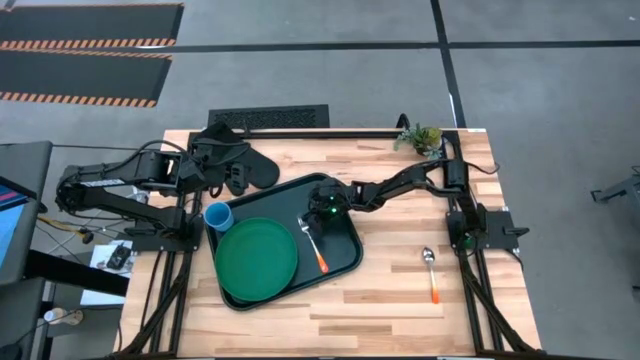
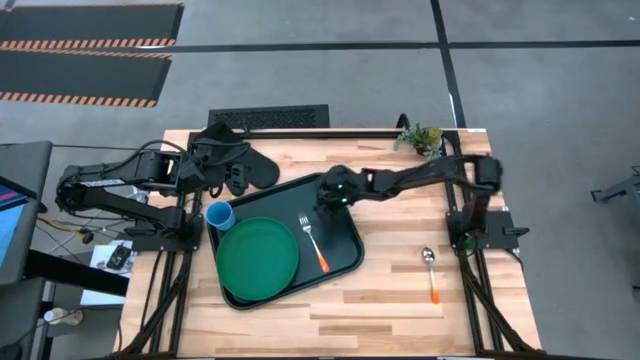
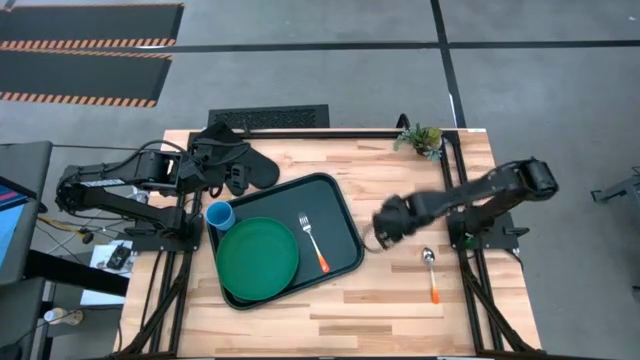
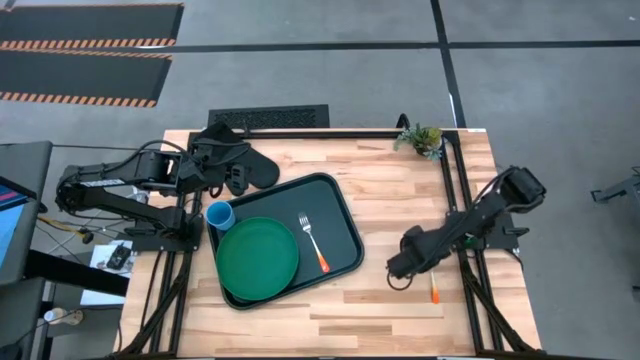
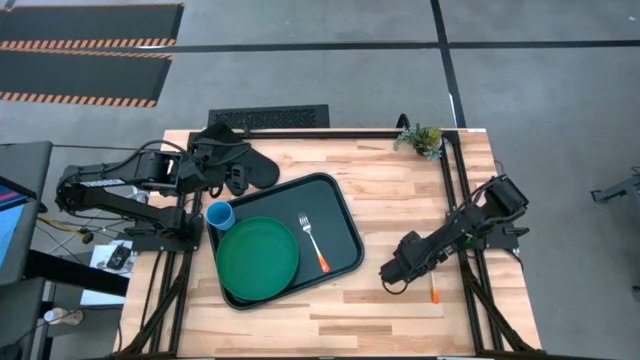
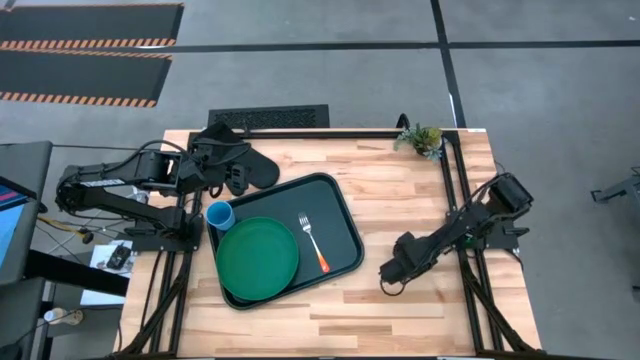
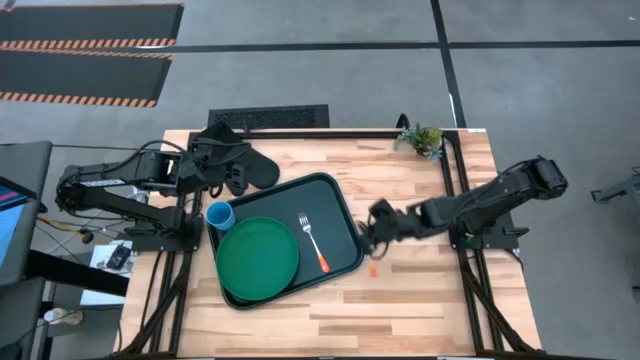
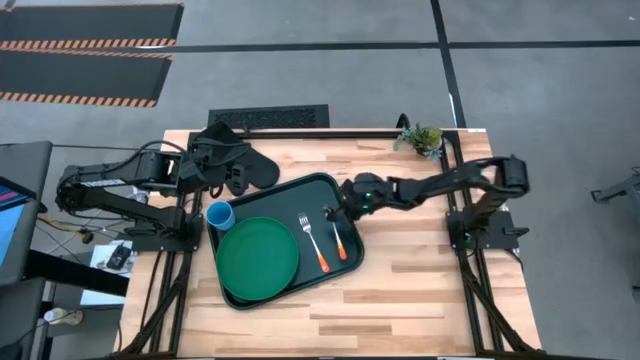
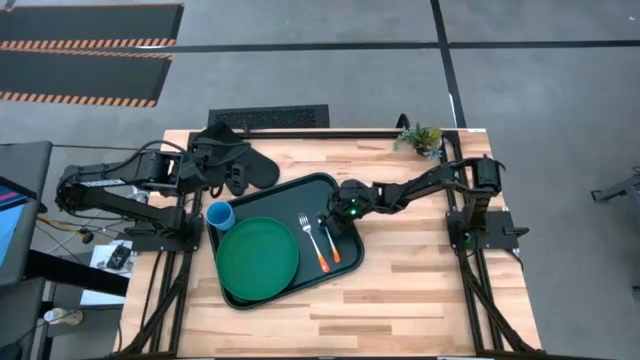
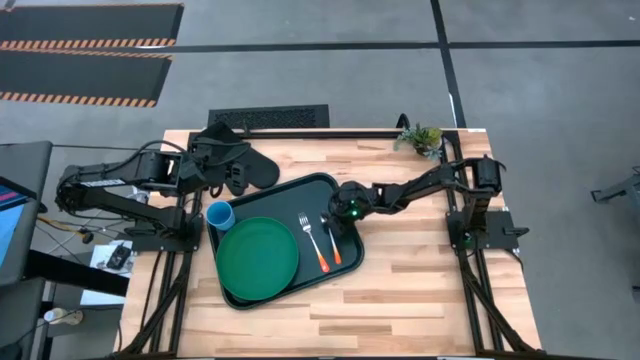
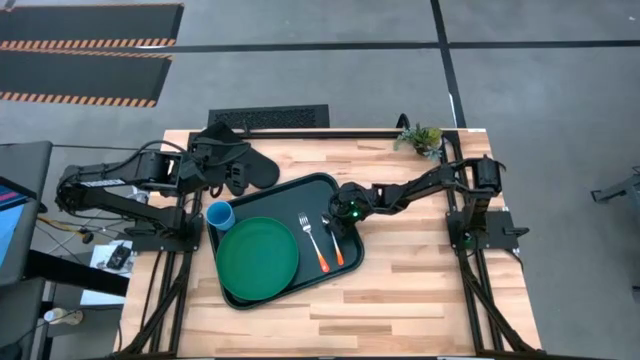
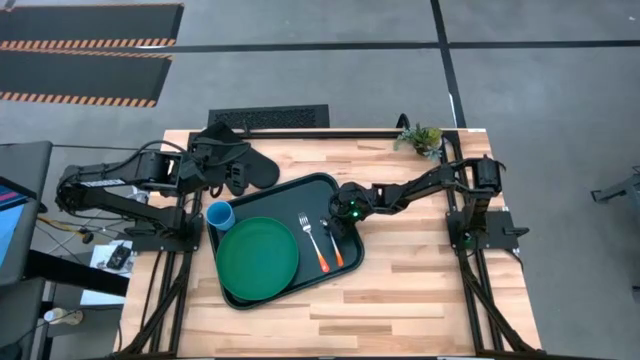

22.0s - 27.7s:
Task: Pick and place plate/cup/fork/spoon on tray
Put the orange spoon on the black tray to the right of the orange fork

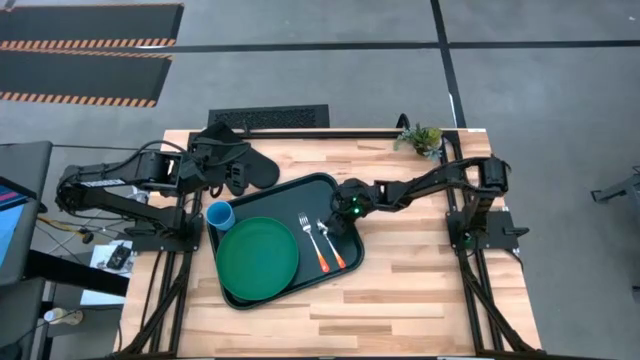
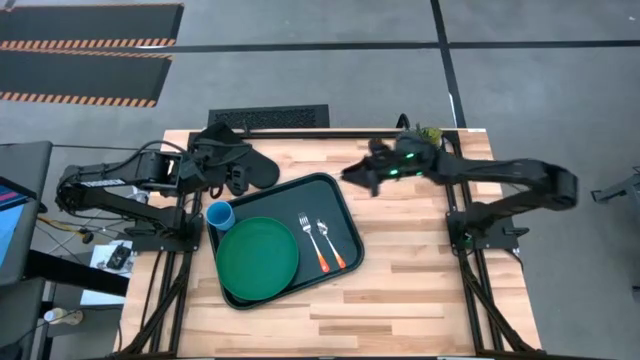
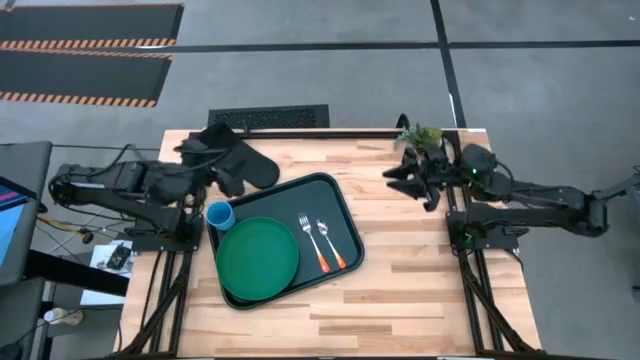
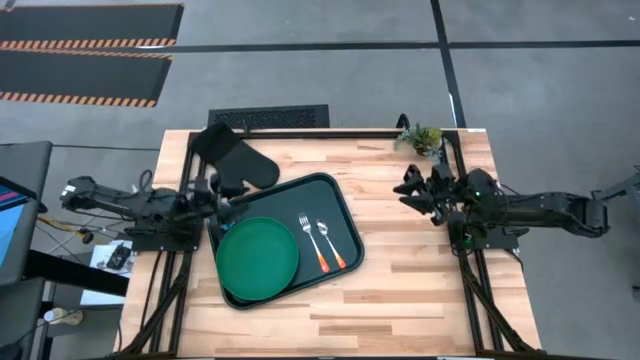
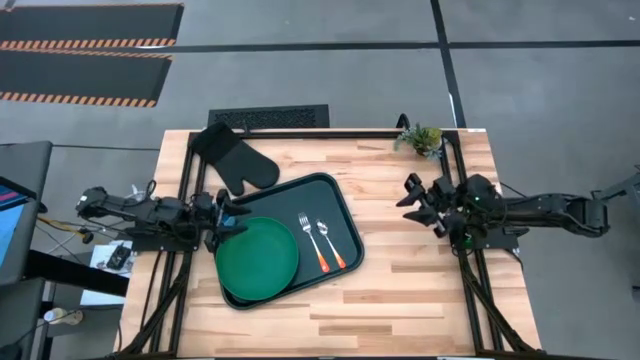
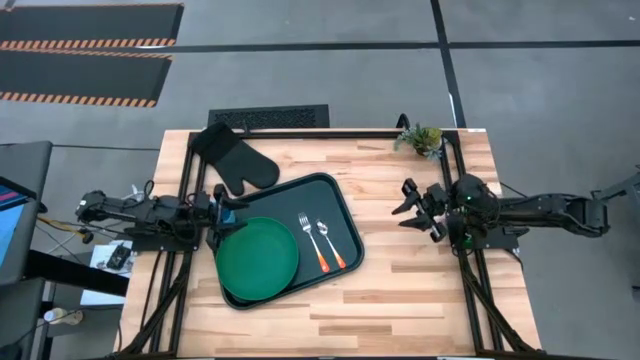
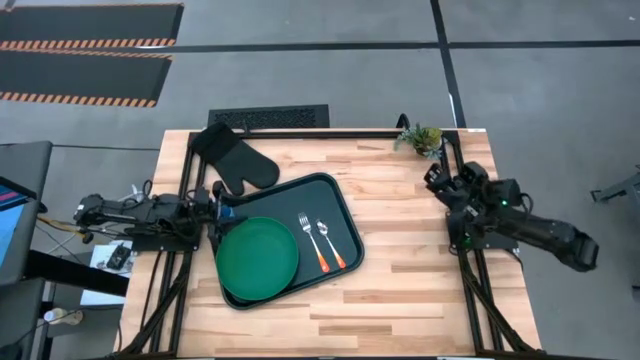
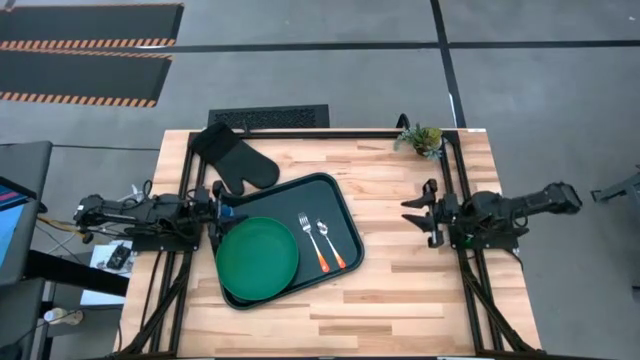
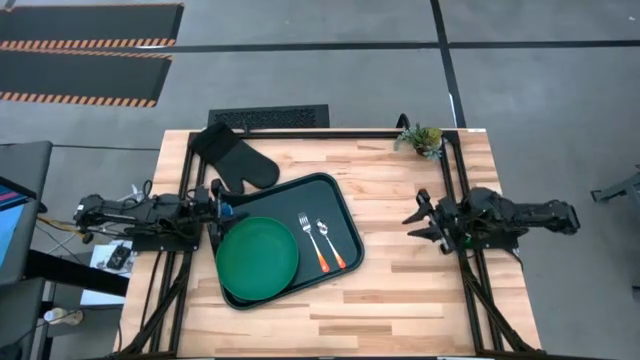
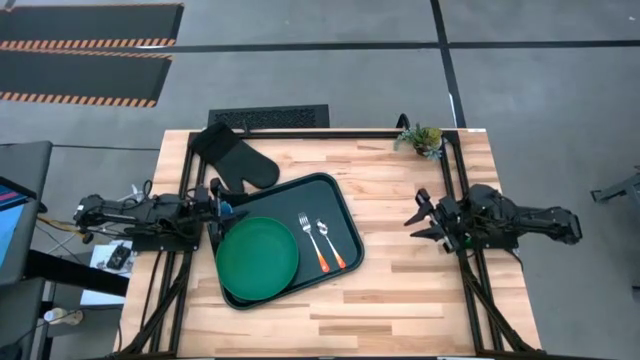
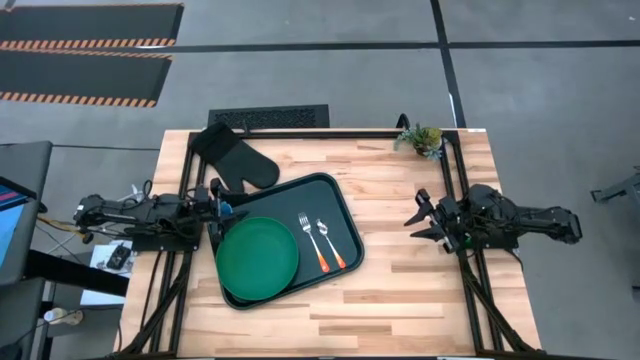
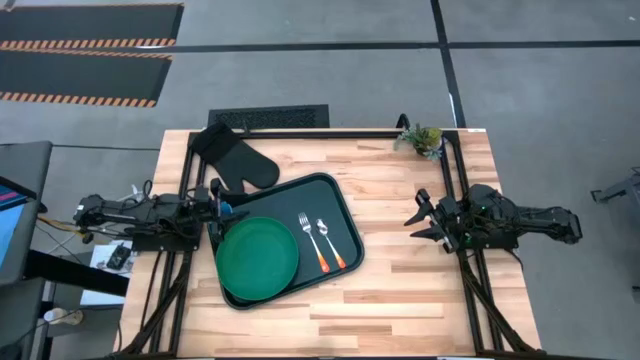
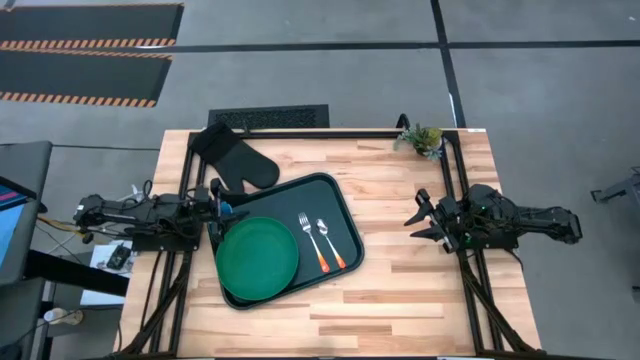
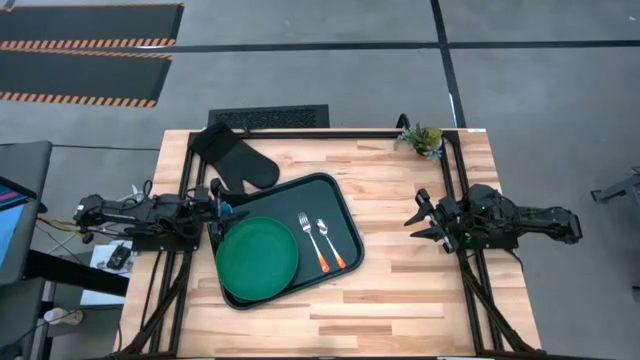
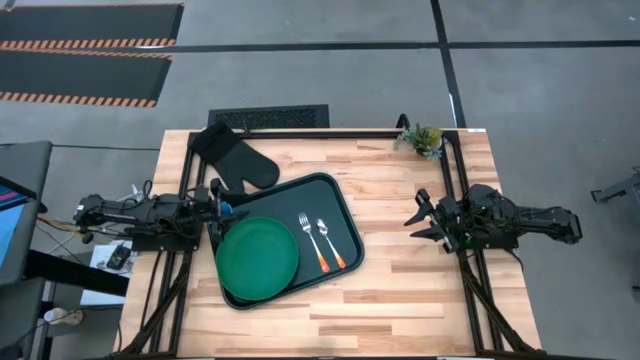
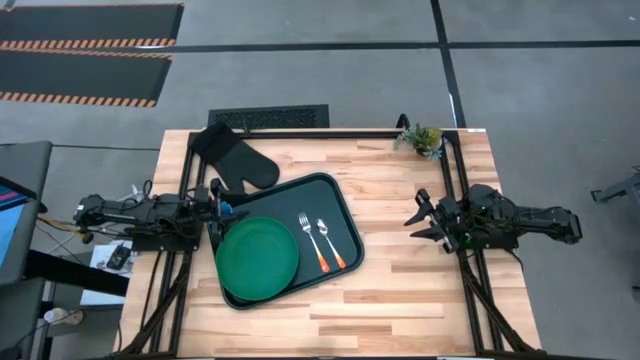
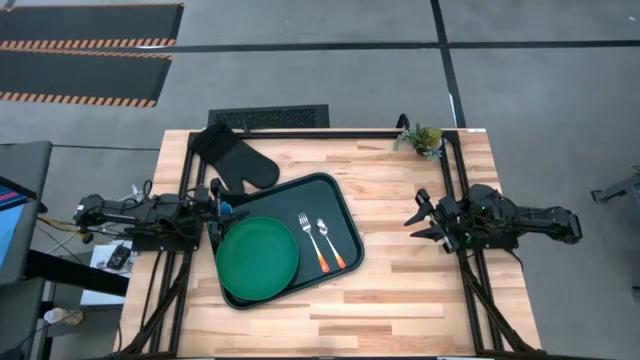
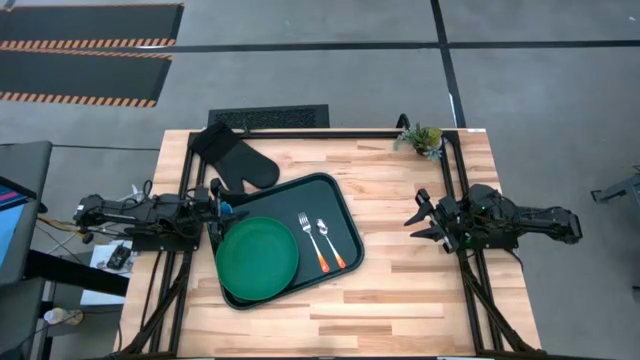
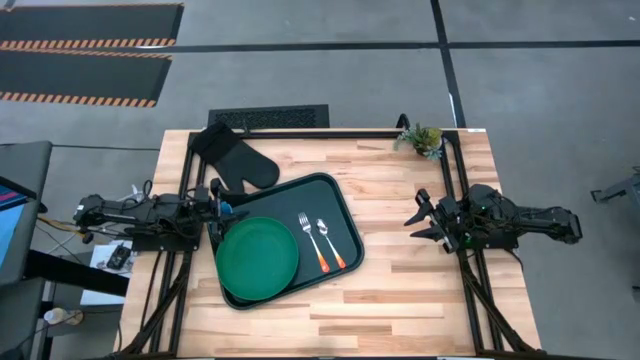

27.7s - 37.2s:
Return to Home Position

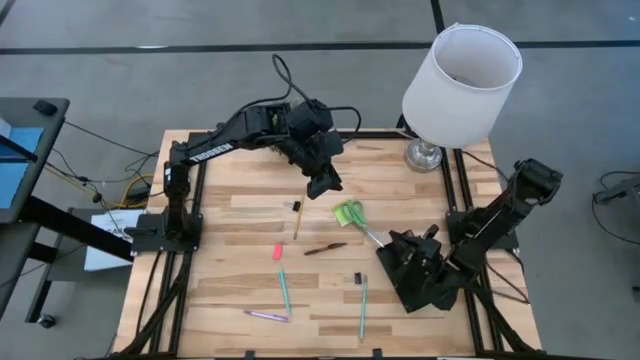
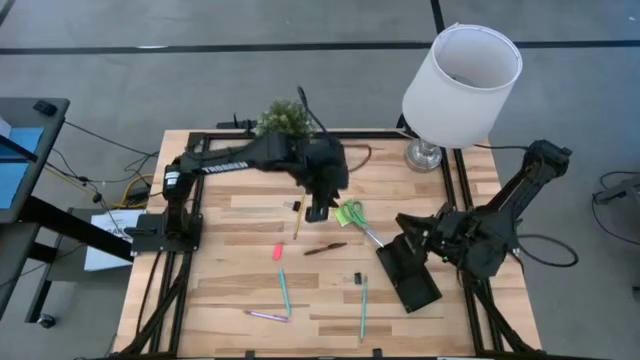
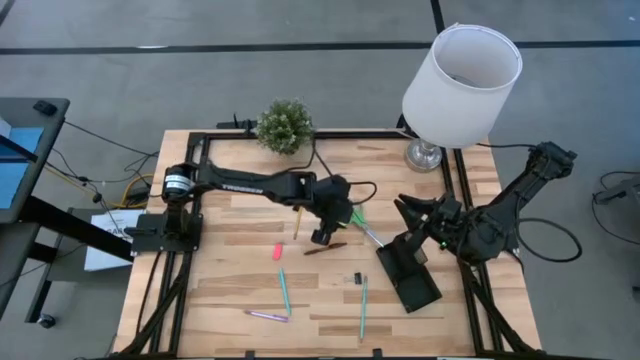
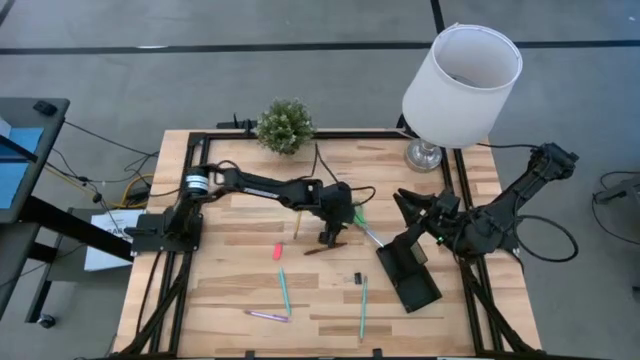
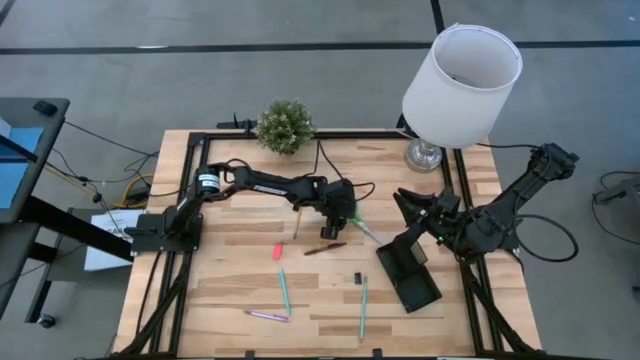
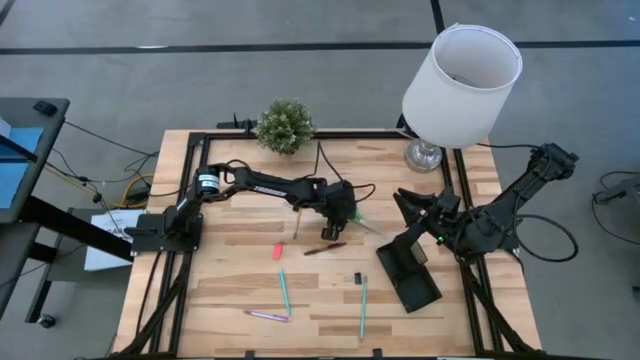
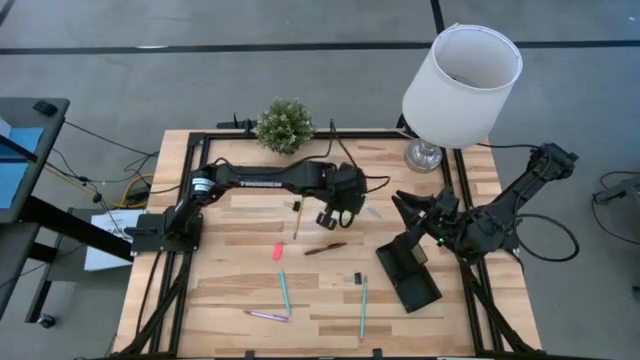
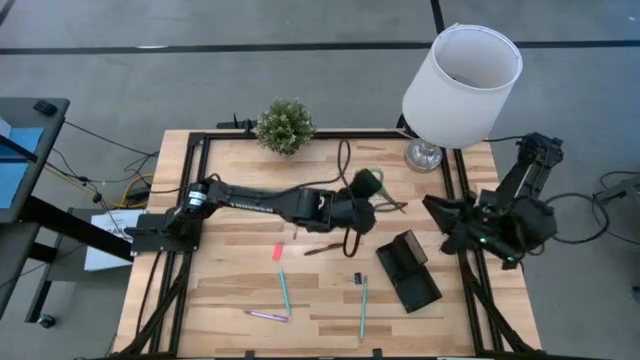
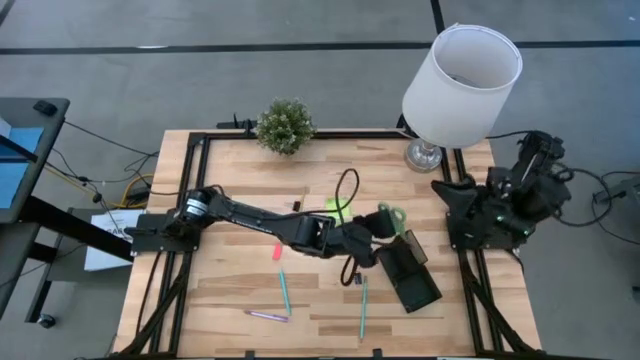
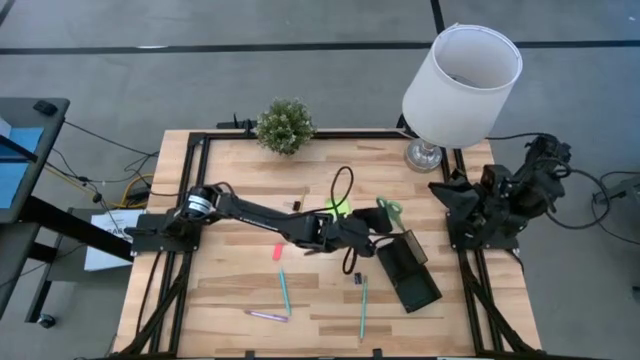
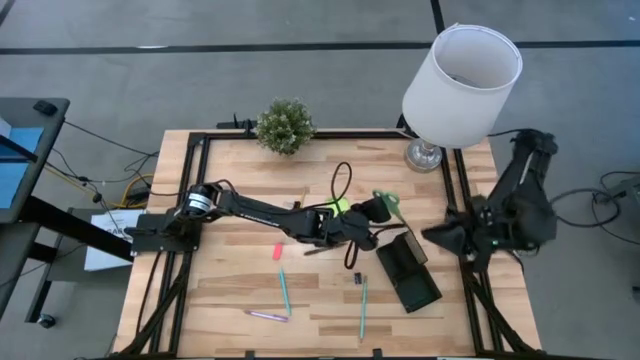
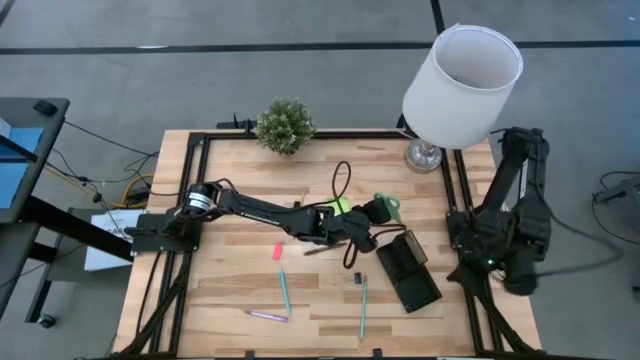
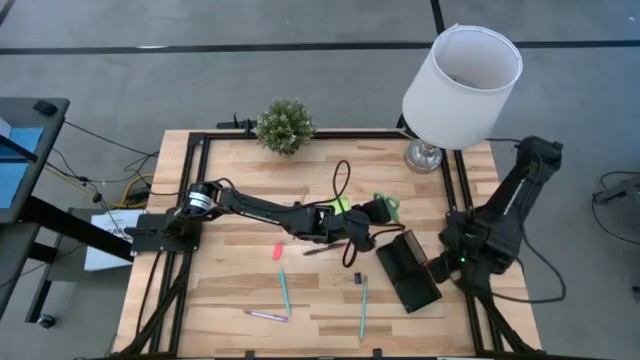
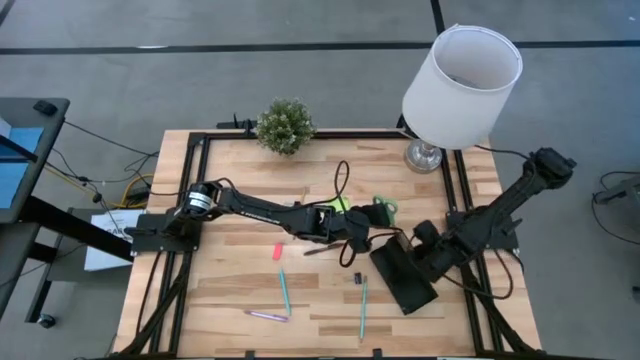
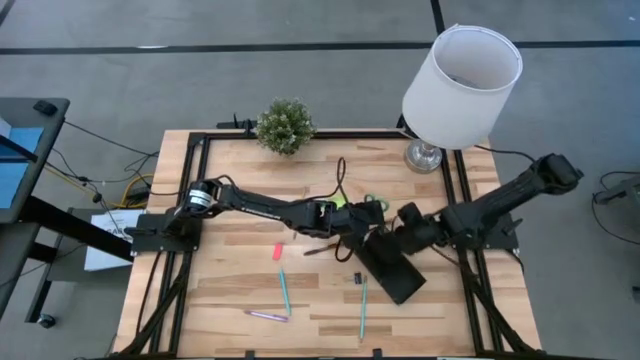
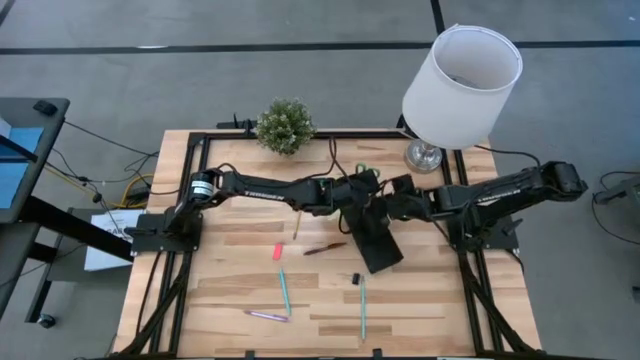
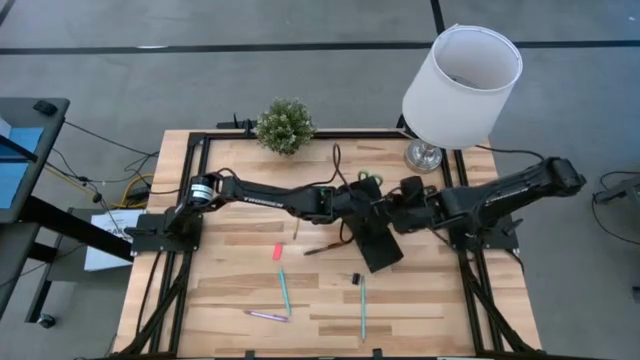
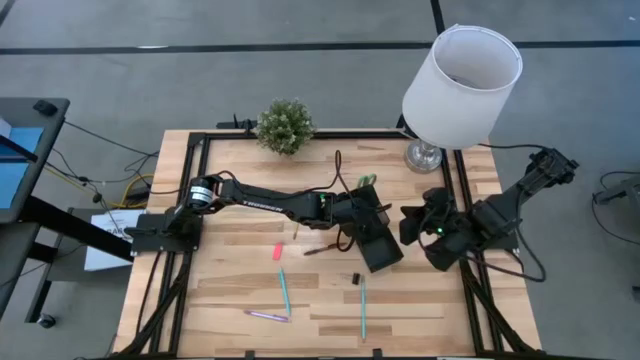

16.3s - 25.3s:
Task: Pick and place office supplies into organizer
Put the green scissors into the black desk organizer
